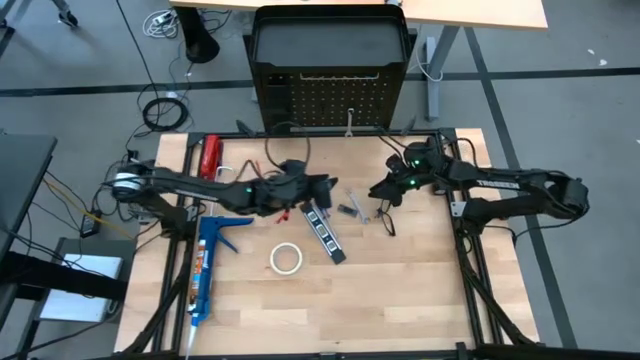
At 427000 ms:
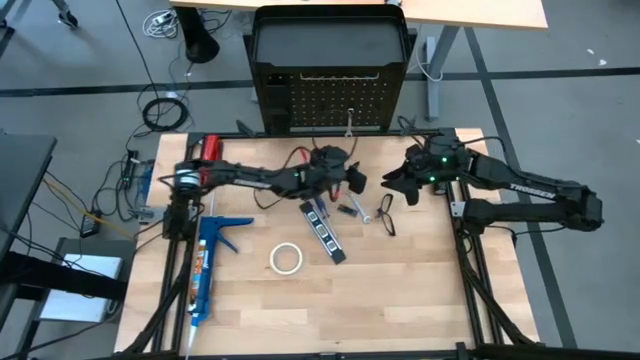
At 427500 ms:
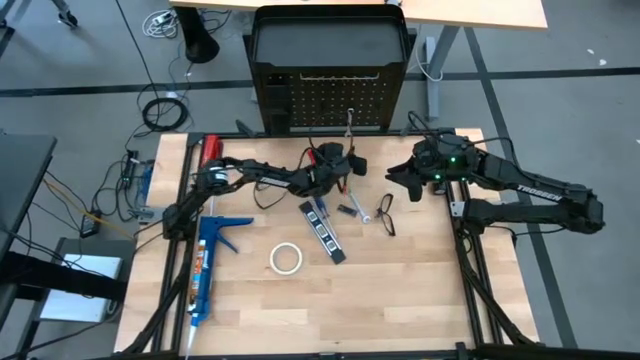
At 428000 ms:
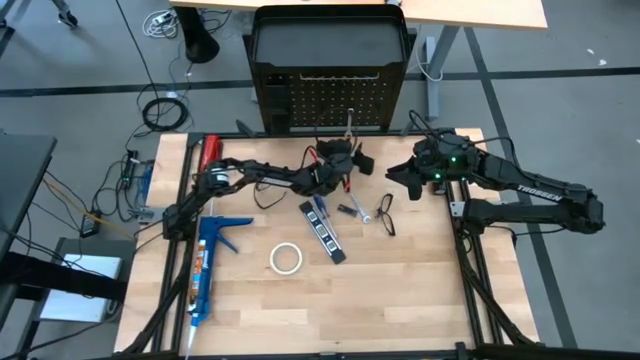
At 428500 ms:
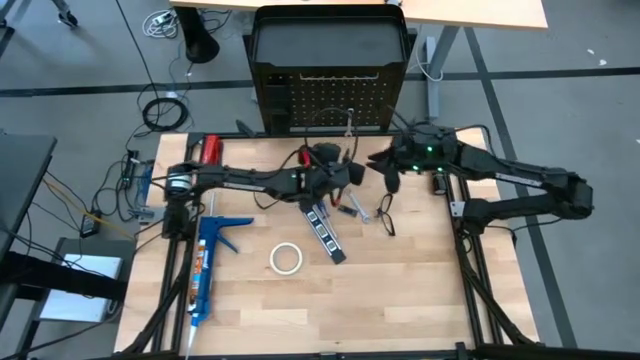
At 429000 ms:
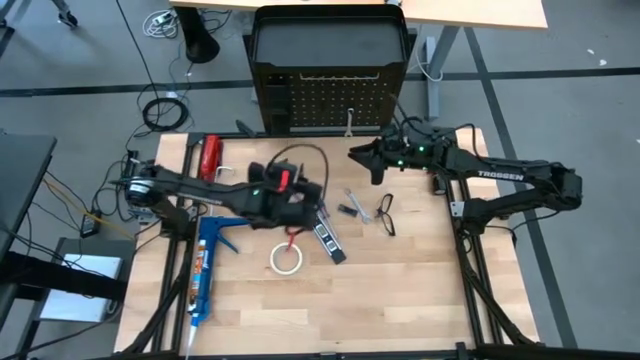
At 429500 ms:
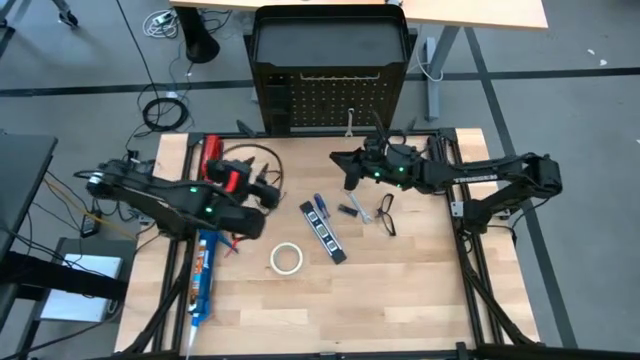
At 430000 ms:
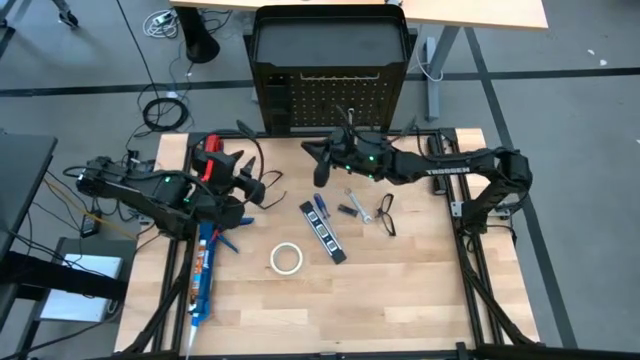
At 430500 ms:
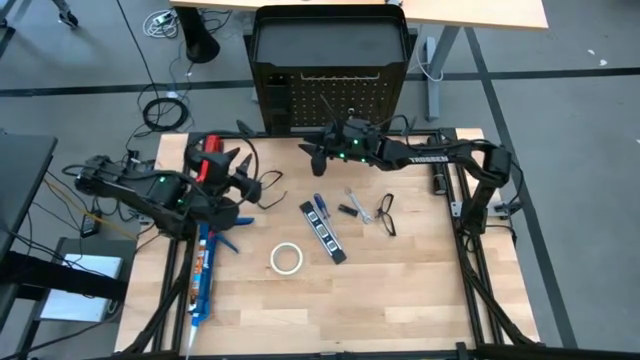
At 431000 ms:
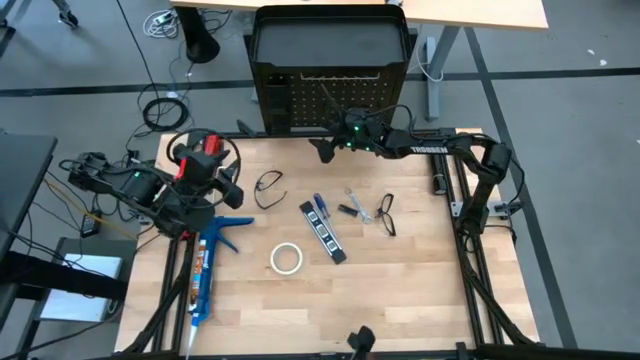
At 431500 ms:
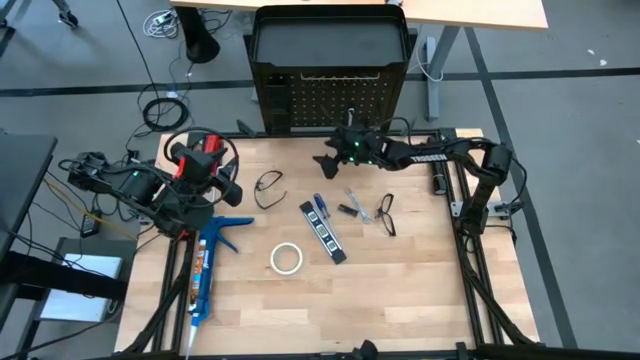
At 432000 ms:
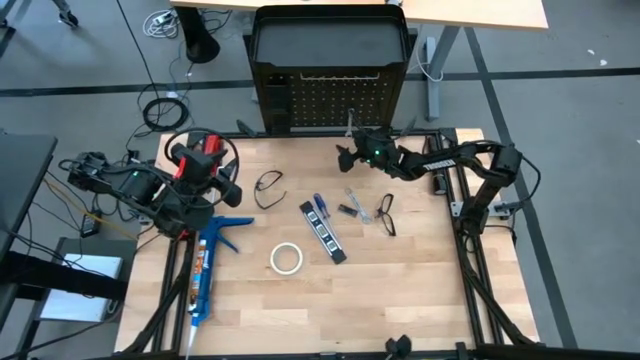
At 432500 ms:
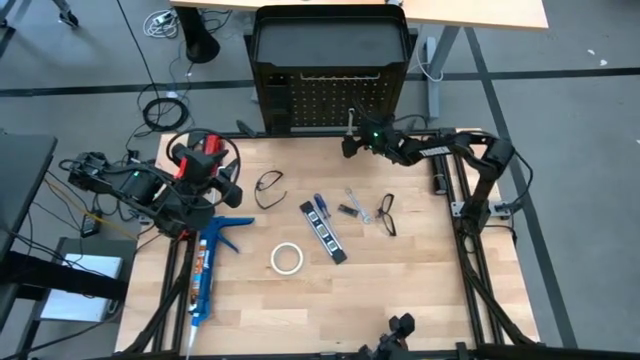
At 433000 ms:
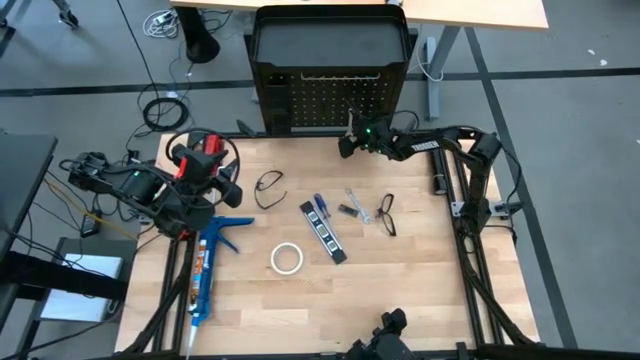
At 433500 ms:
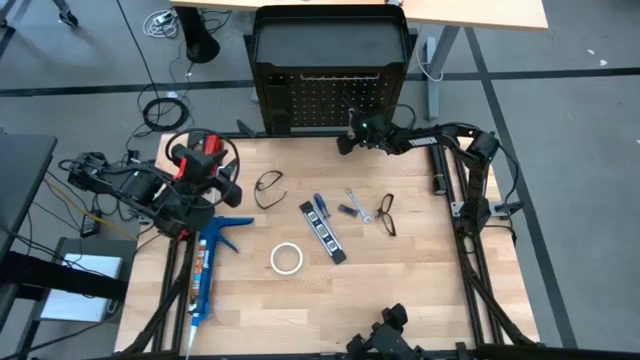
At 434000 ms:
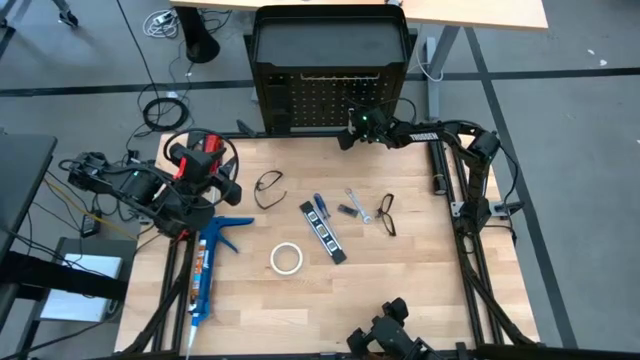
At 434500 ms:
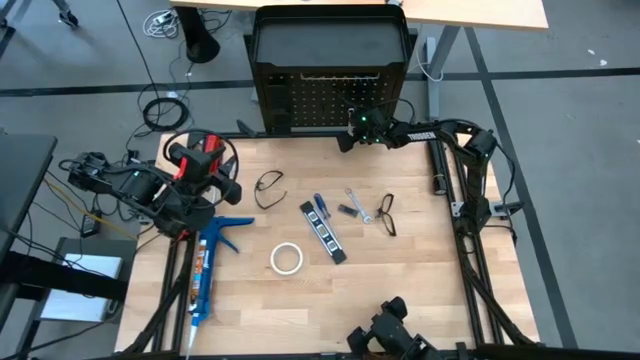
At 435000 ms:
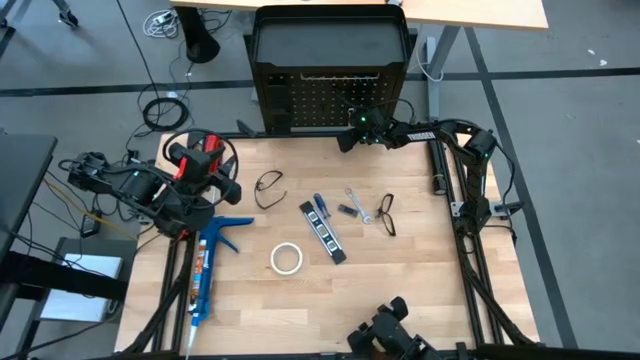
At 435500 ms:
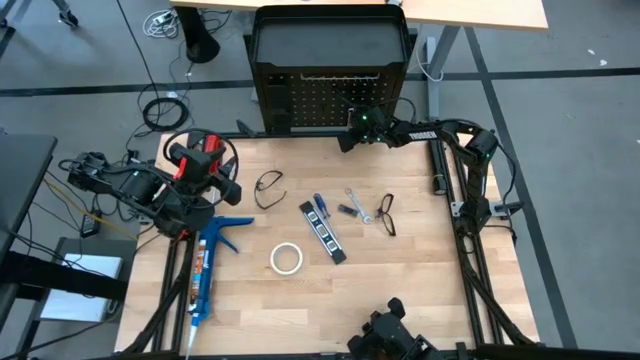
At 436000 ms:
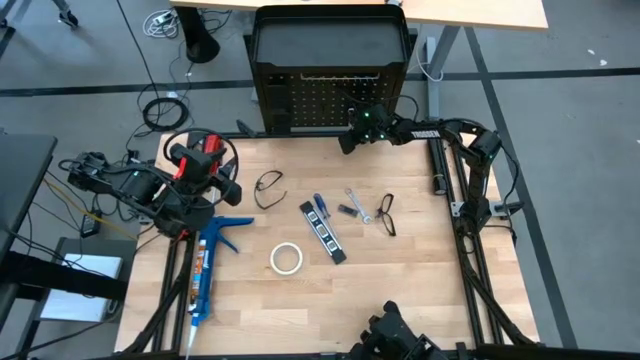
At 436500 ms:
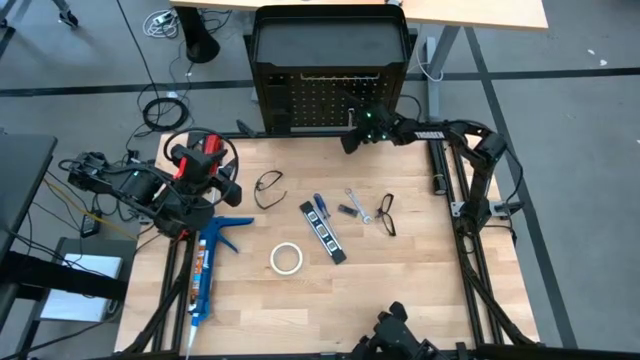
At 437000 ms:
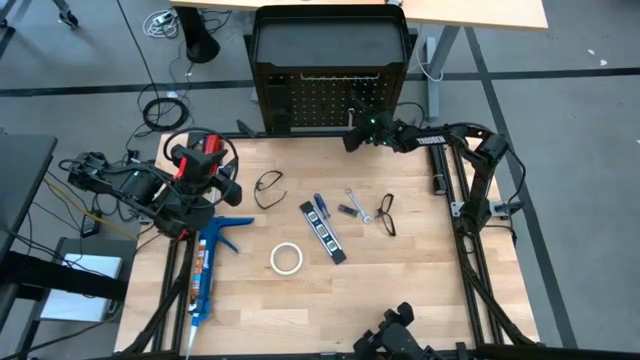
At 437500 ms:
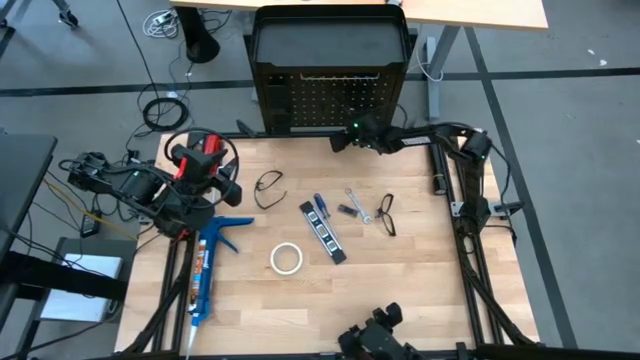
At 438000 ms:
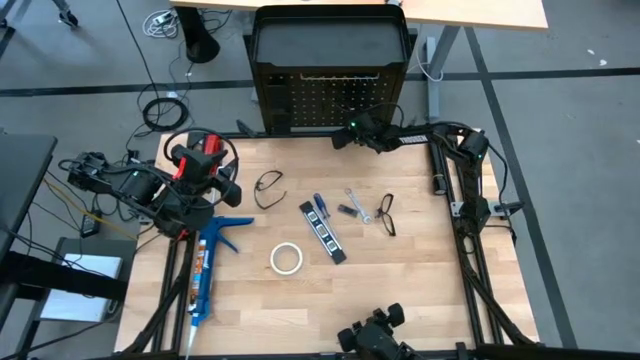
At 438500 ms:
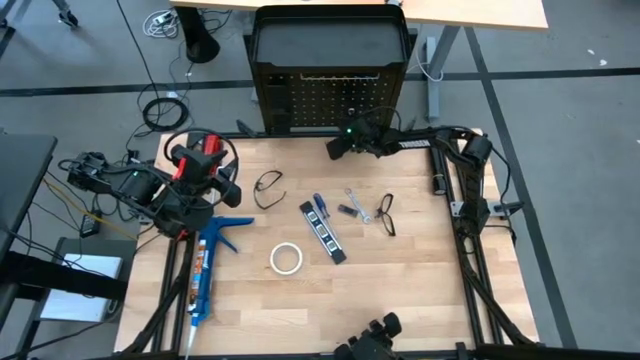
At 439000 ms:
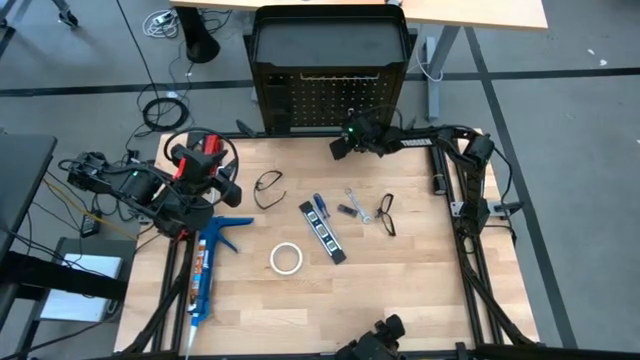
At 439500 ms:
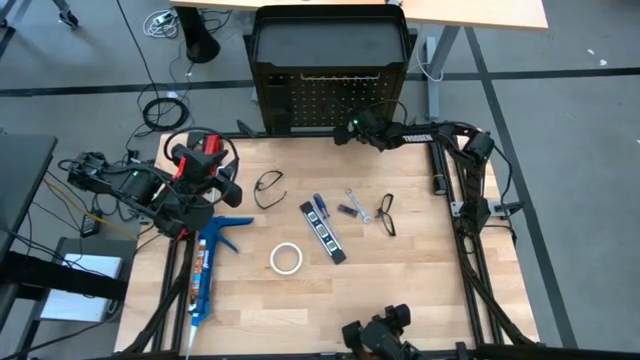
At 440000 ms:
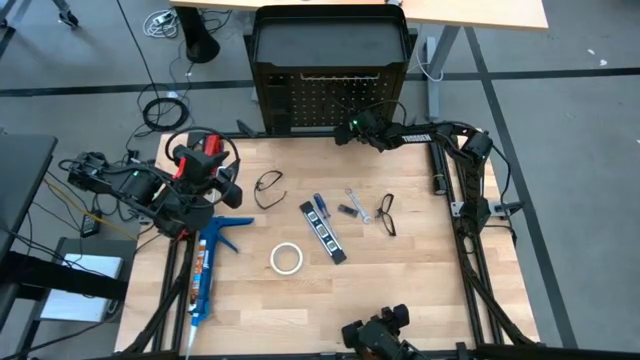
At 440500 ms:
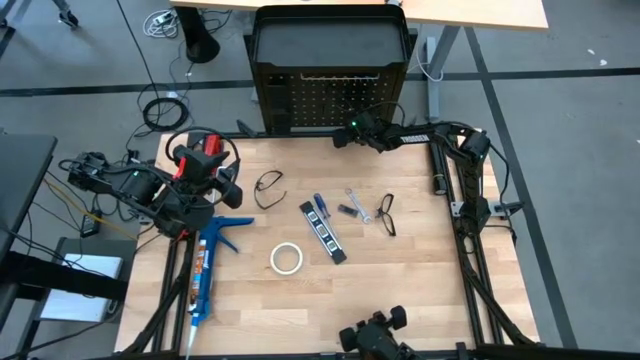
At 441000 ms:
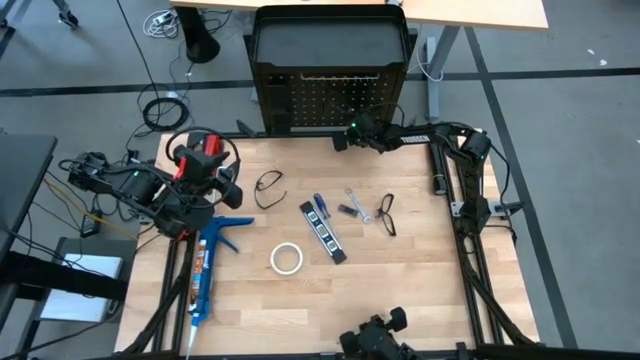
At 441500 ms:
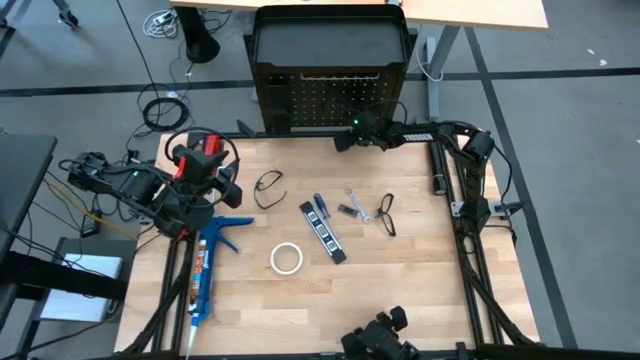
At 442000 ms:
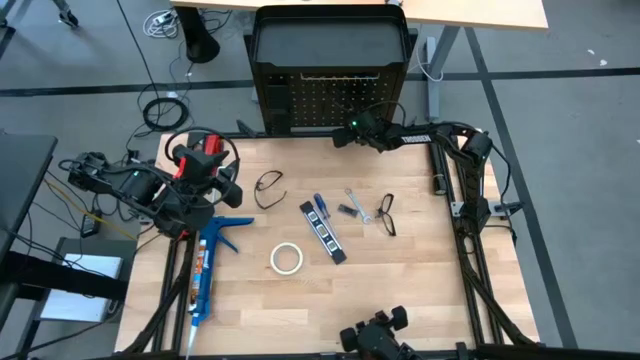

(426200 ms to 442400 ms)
Task: Hang tools onto peg board
Unhang the wrench from the black pegboard

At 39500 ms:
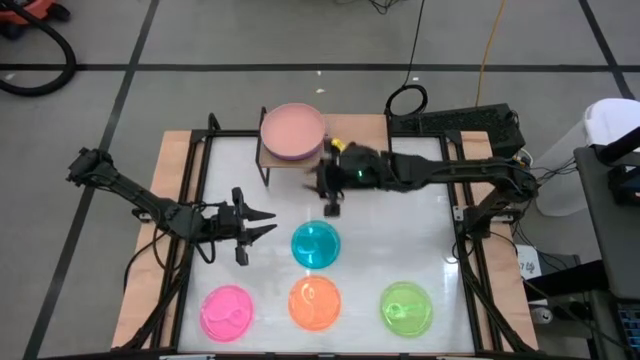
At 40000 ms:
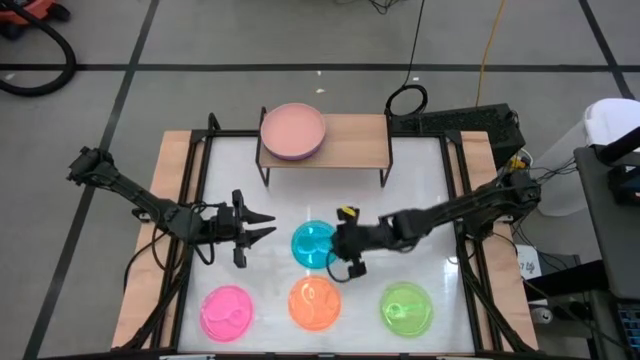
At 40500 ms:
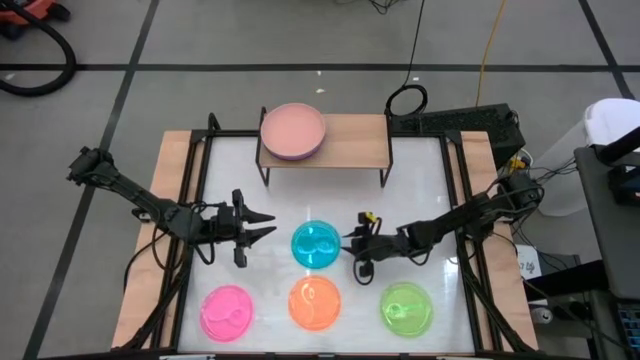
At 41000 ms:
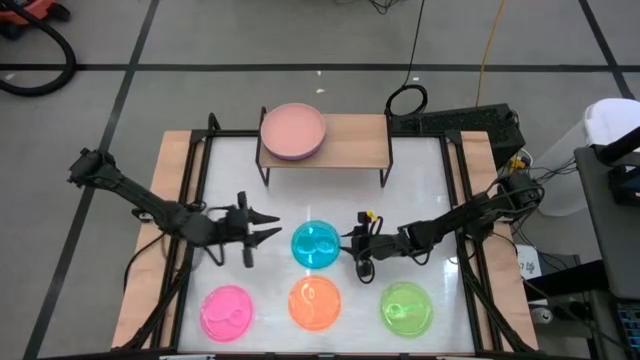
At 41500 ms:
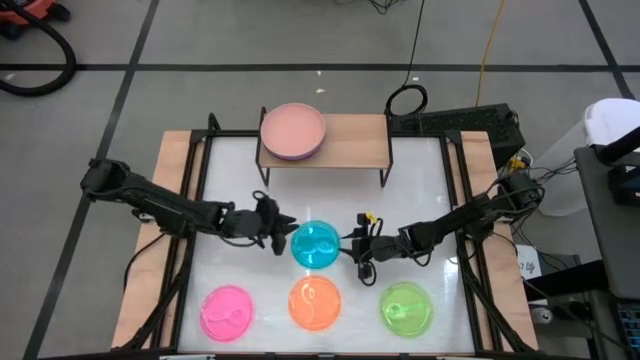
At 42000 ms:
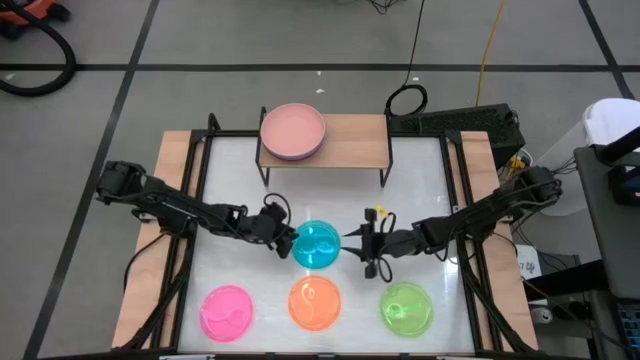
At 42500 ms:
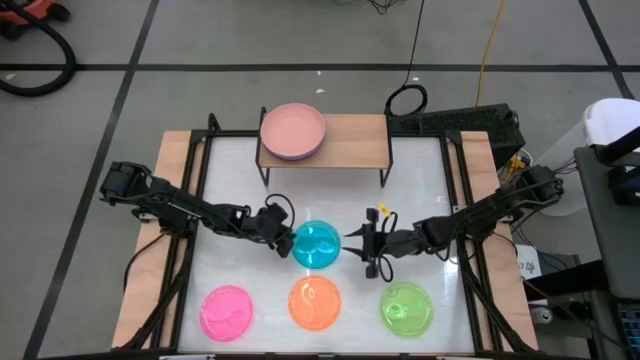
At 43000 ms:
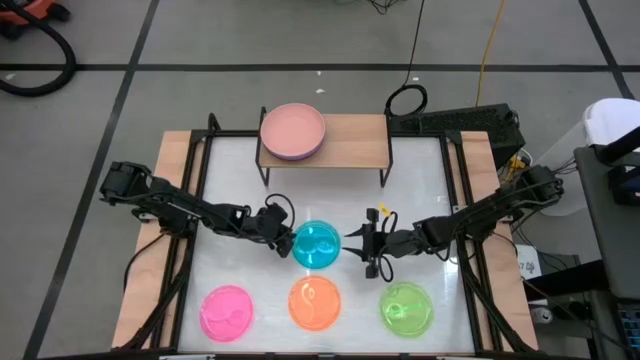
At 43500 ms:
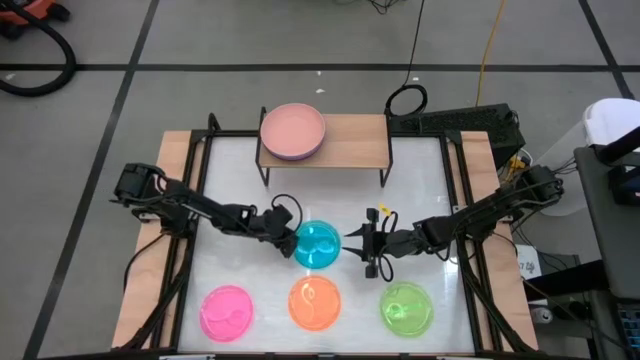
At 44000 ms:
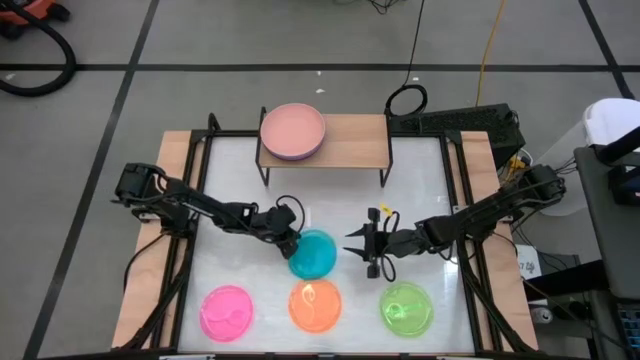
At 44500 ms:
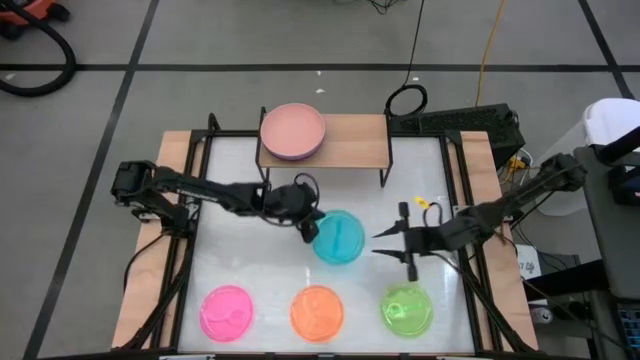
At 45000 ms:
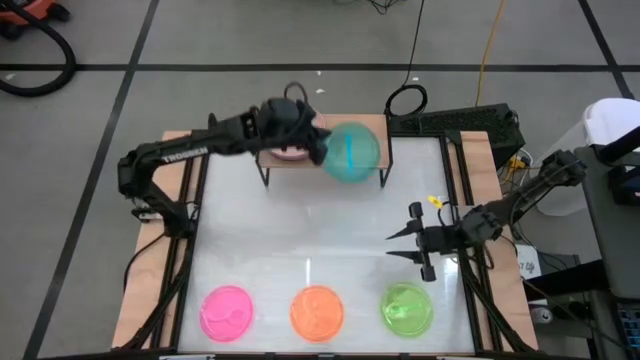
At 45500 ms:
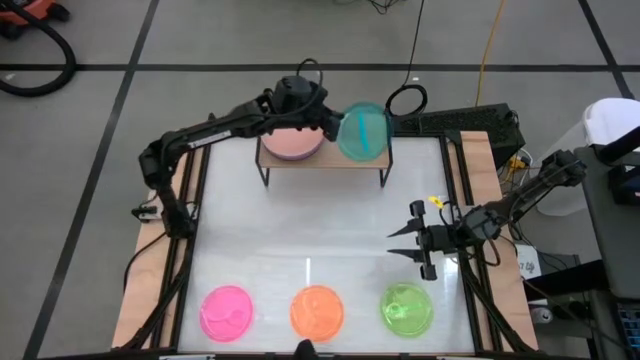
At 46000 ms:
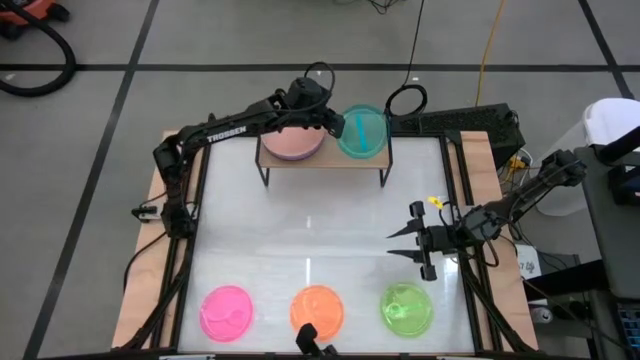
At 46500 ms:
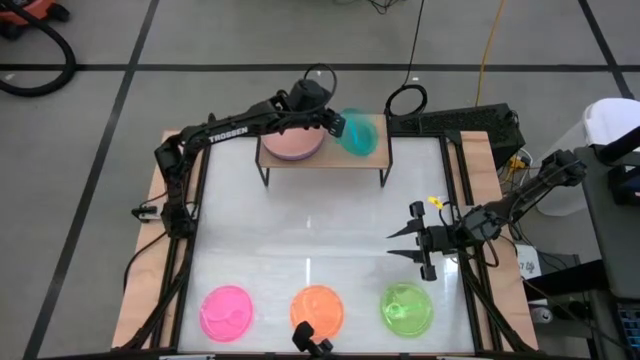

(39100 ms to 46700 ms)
Task: Place and stack plates onto a shelf
Put the transparent blue plate on the shelf
